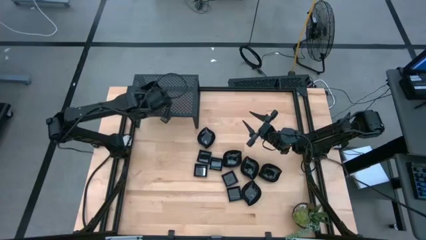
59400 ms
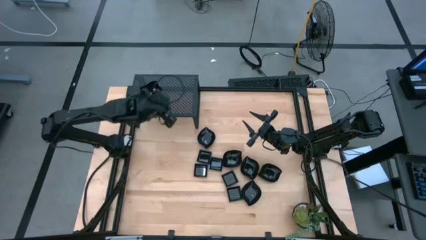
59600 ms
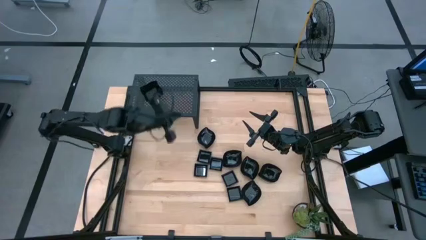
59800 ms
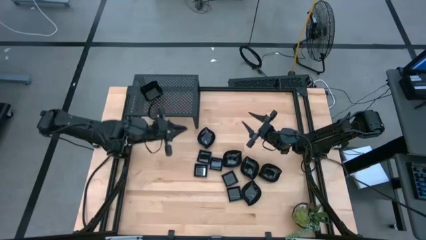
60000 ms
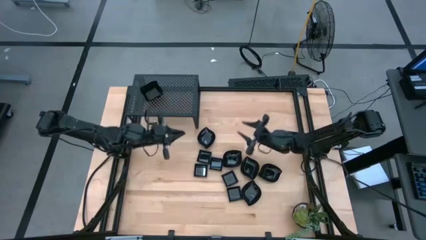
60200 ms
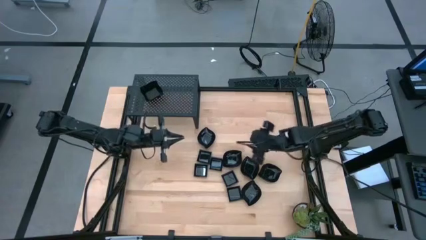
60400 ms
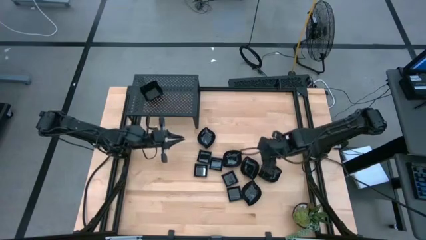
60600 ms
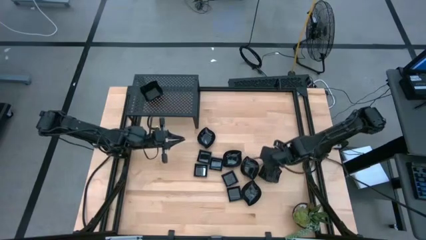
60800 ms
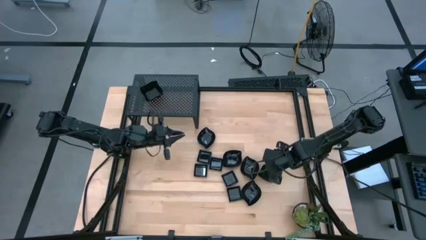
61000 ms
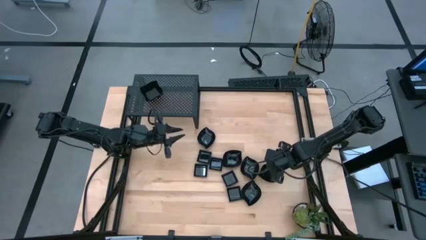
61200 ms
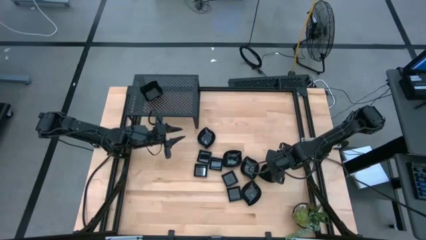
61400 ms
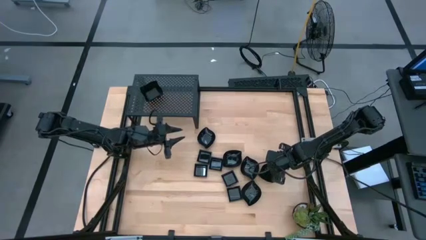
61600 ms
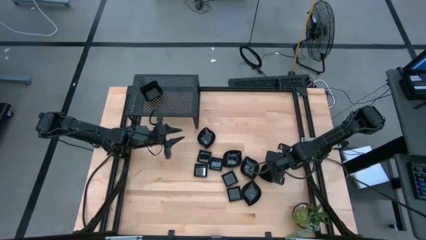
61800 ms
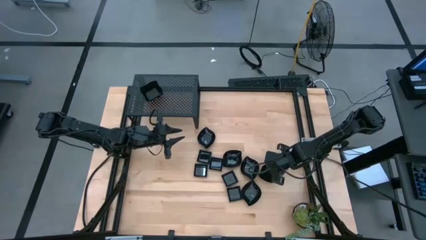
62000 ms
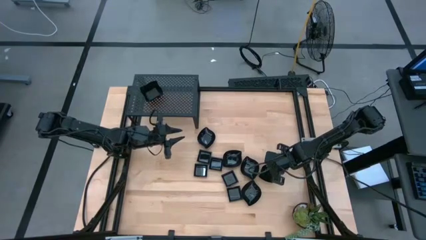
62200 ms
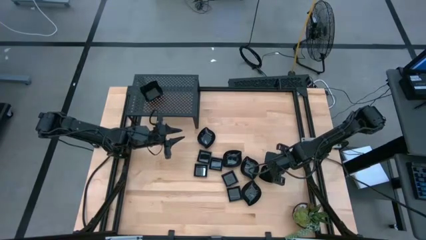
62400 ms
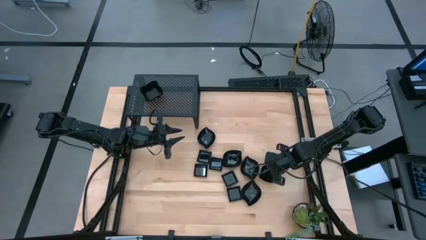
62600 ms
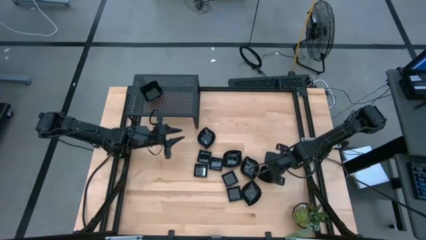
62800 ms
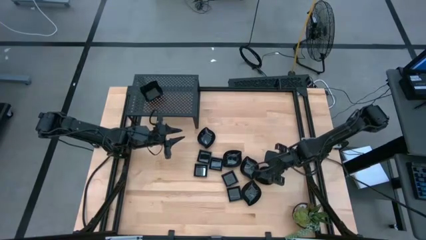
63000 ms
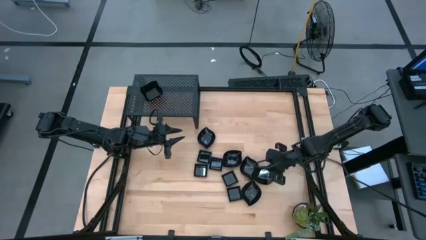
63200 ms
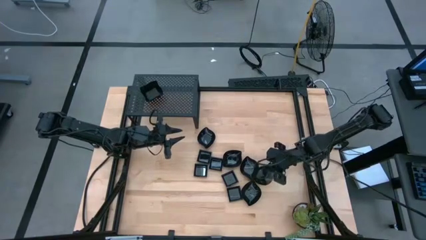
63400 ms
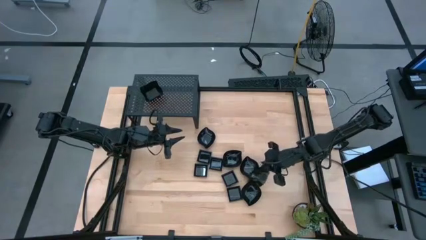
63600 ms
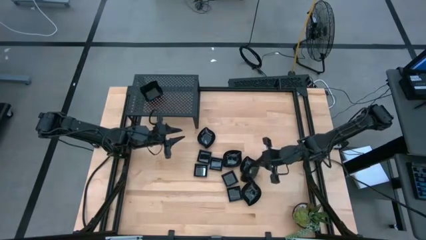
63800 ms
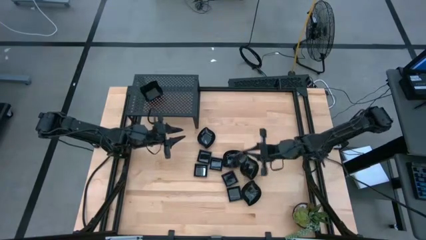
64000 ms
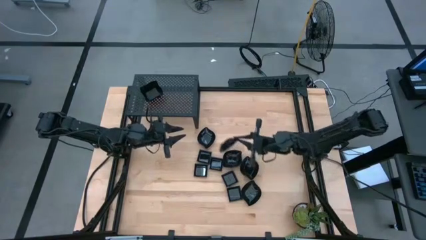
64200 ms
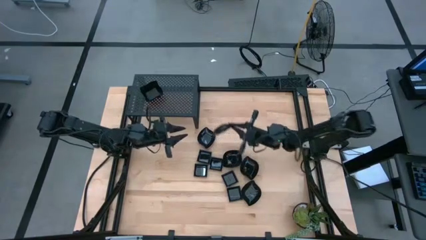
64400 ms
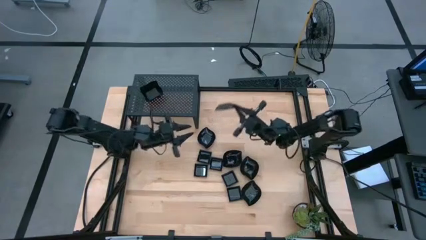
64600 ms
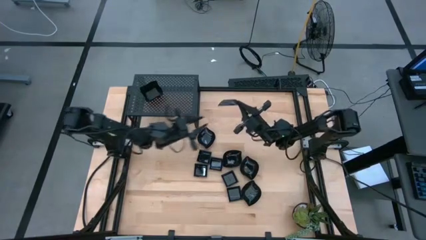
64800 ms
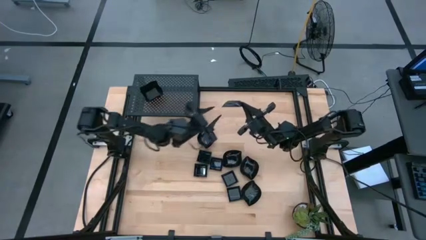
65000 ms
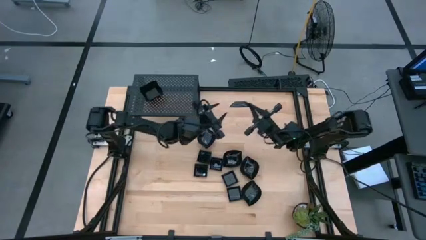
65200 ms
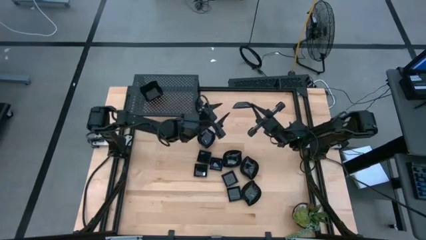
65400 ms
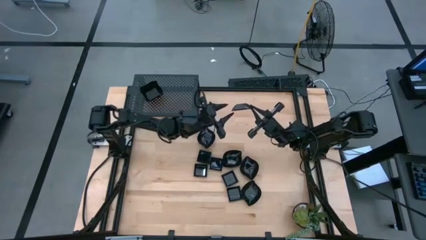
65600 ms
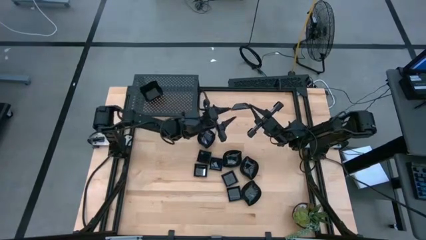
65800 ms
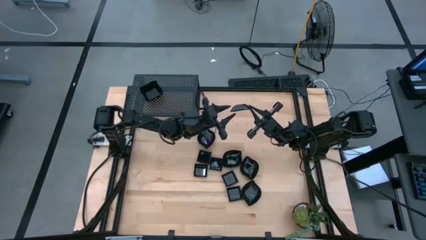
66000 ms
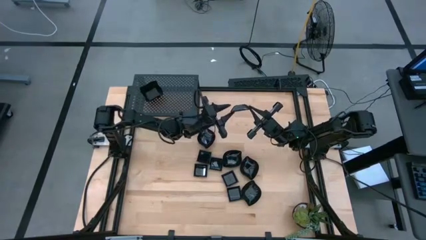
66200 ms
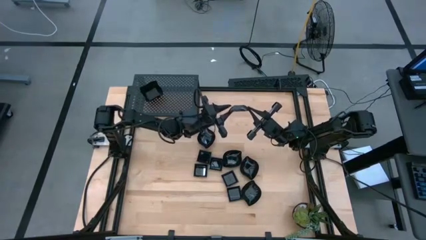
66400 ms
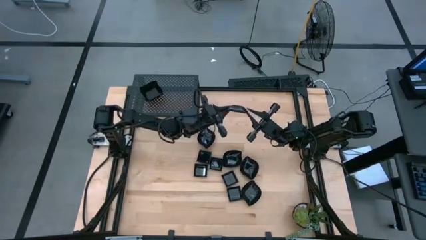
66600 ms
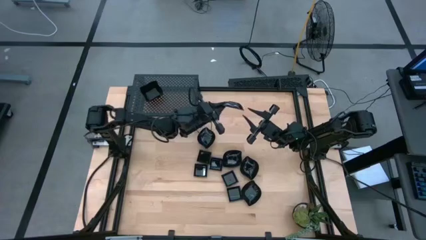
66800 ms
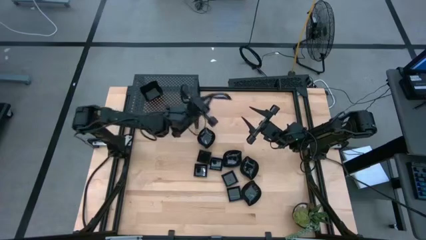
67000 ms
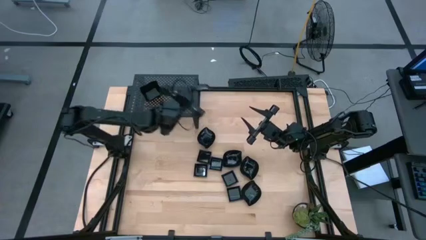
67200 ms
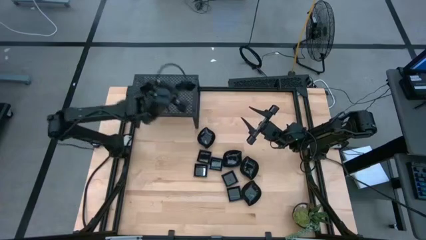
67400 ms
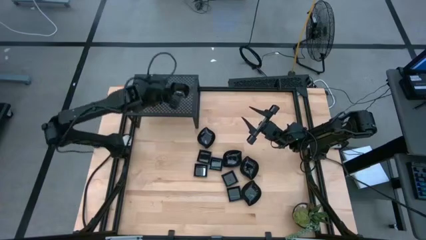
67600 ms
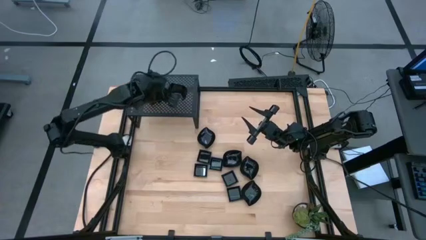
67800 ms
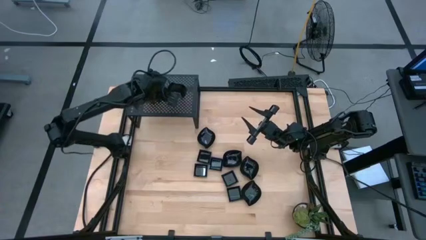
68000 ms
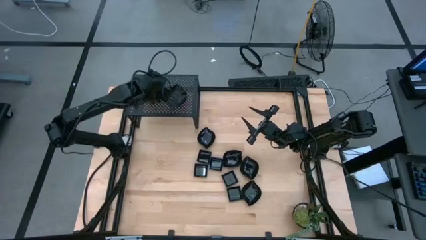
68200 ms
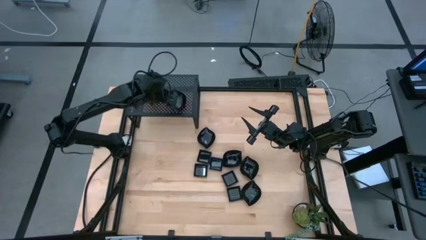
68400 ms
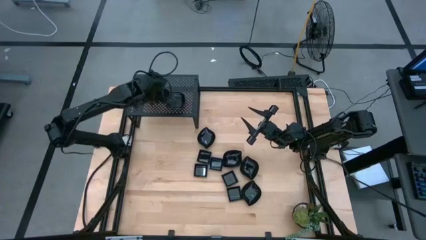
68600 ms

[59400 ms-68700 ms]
Task: Pick & Place Mini shaped plates
Put the leaf-shaped plate on the shelf

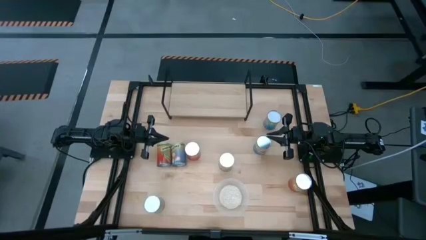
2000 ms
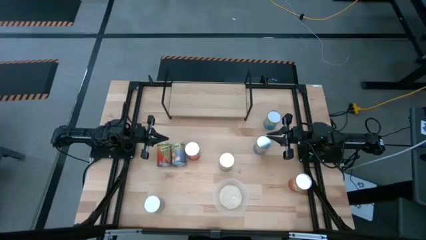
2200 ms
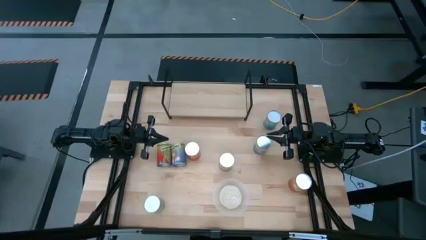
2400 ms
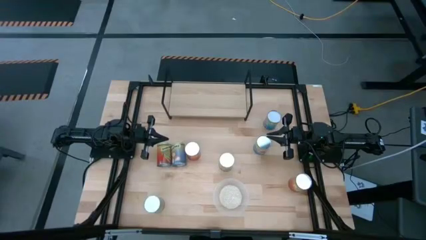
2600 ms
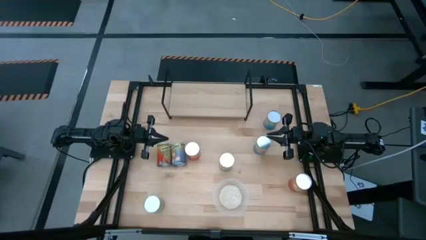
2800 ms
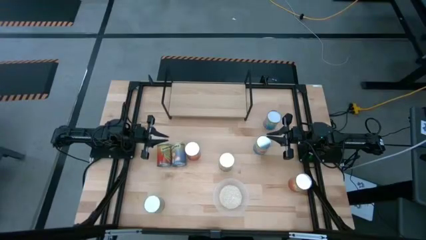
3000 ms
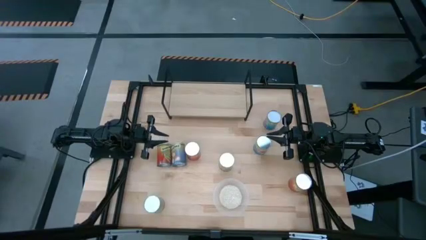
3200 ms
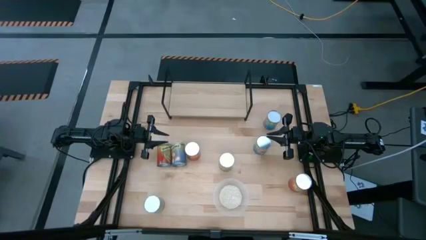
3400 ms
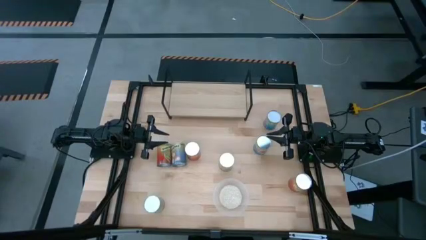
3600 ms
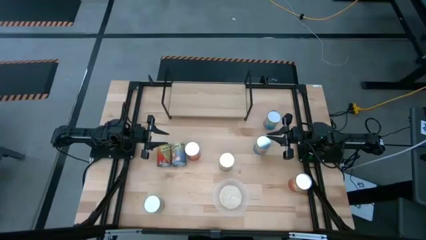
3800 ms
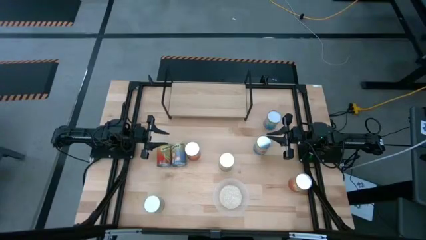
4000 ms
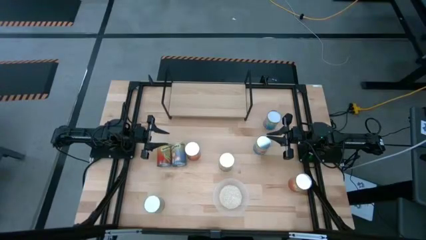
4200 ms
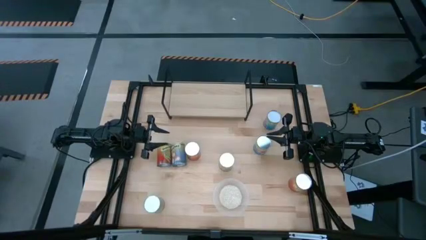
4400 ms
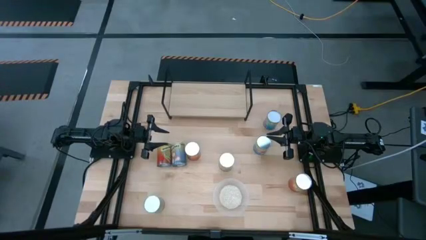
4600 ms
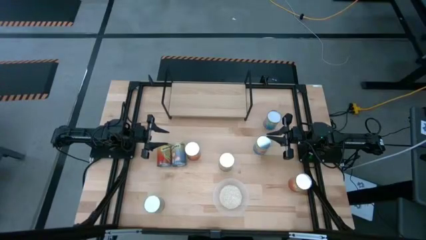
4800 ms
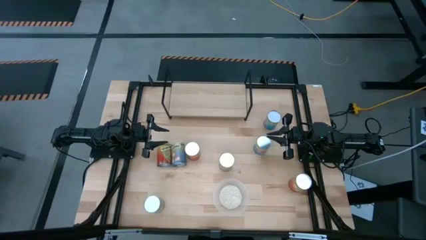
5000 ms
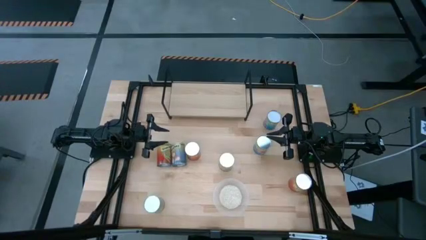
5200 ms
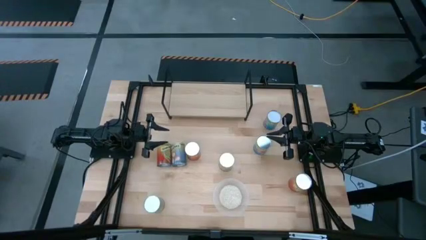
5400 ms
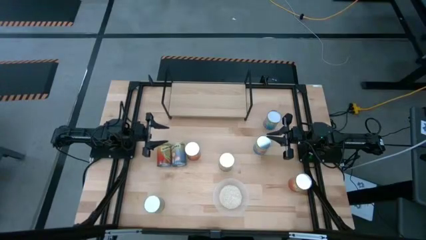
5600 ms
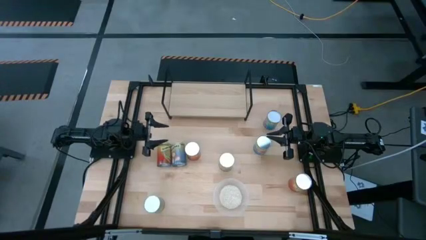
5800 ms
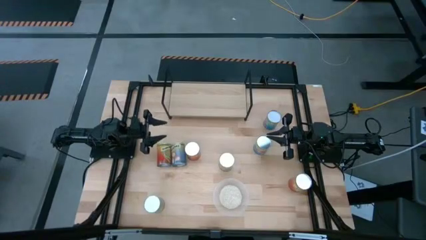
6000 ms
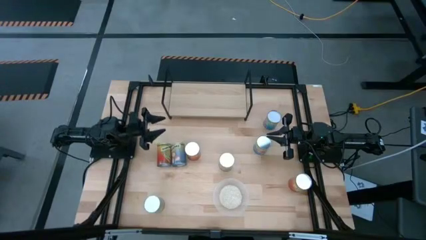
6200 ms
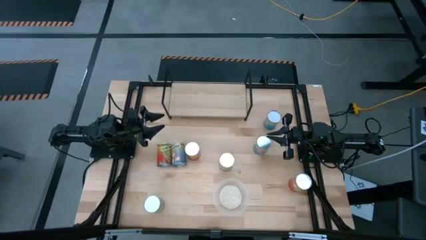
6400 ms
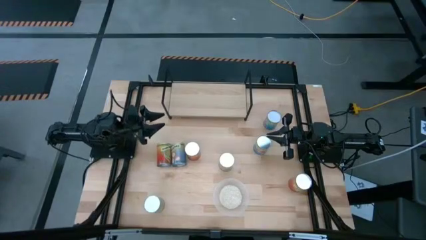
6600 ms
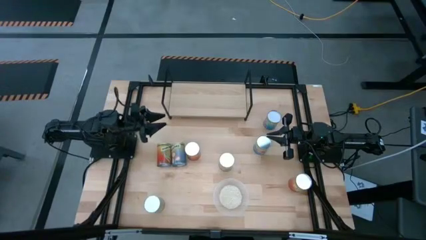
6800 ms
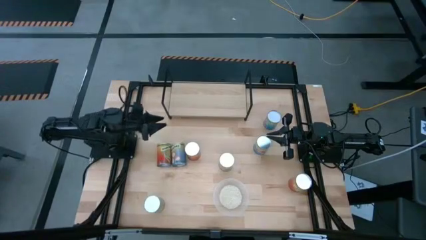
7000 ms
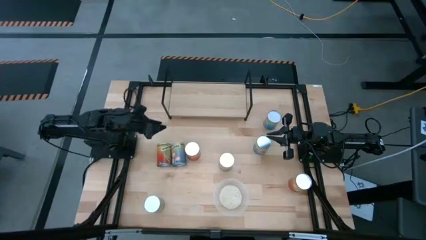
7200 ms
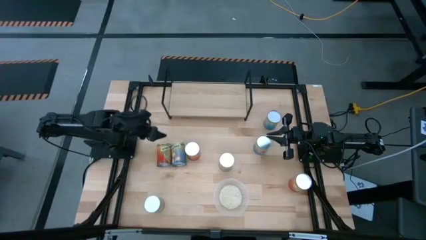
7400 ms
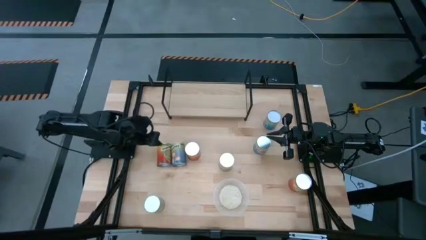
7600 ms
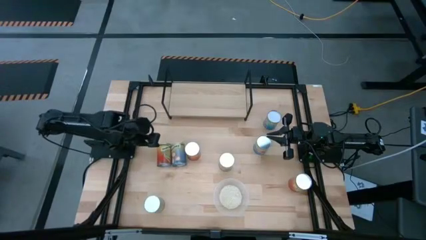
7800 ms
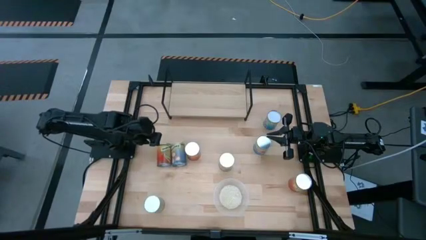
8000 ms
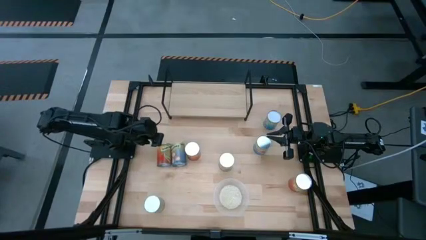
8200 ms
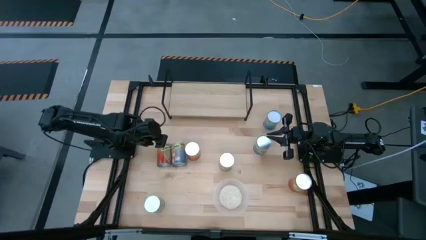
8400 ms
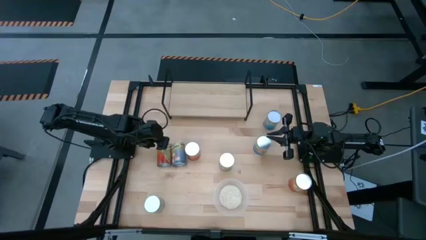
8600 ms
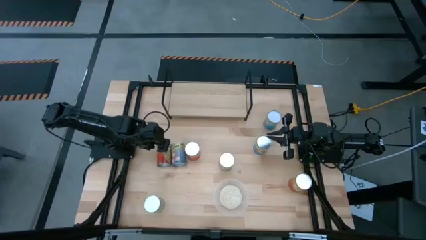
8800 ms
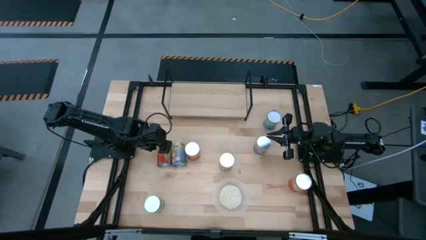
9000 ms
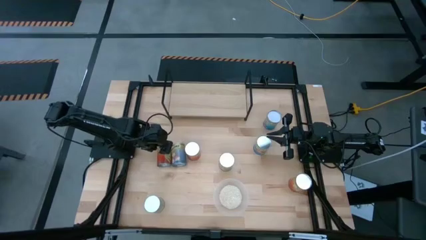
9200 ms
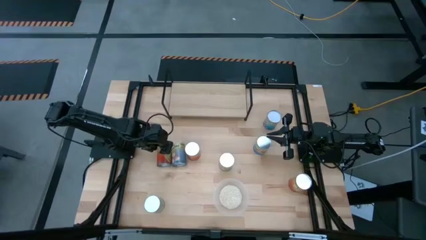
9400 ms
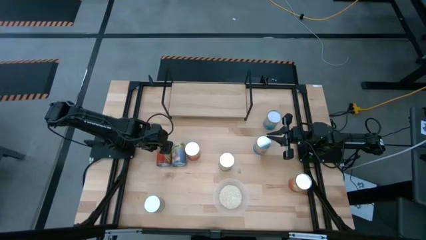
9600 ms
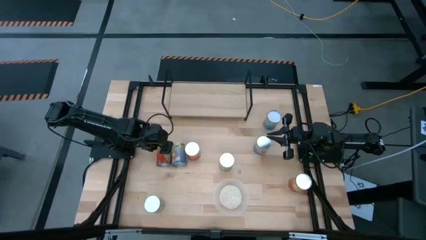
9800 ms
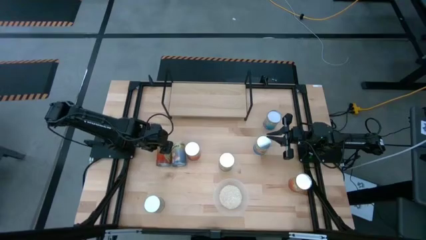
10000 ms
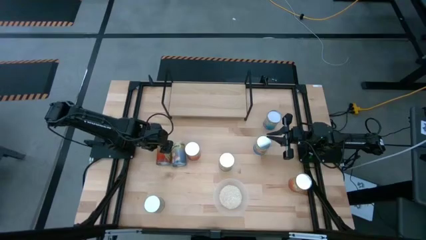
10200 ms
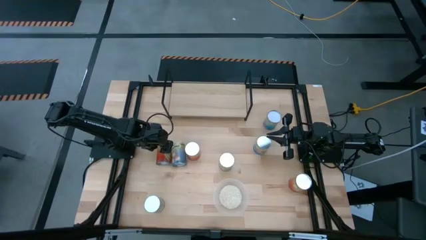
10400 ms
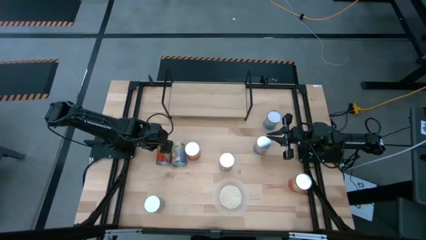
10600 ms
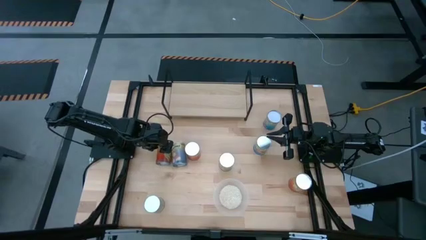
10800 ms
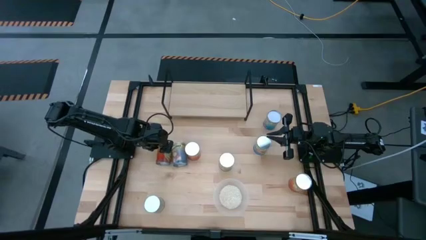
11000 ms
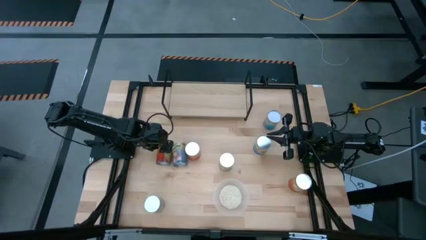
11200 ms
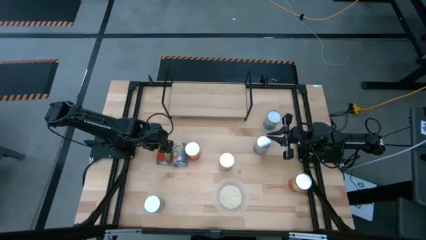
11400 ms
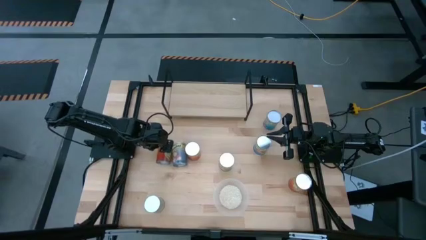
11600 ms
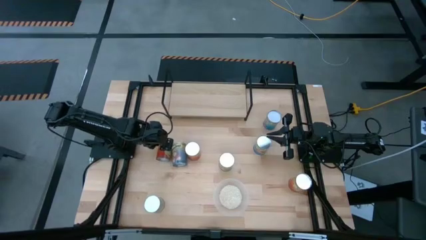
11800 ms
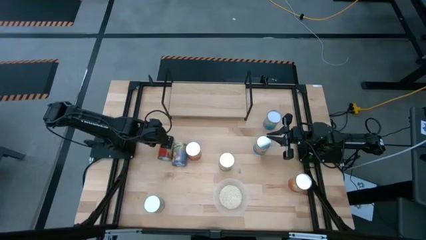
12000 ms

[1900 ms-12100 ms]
Task: Pick and place cans onto a shelf
Put the canned green bean on the shelf
